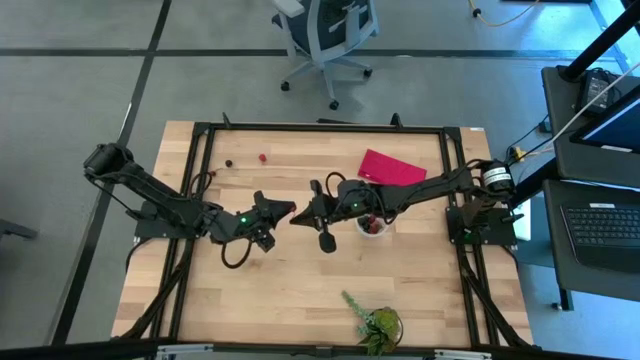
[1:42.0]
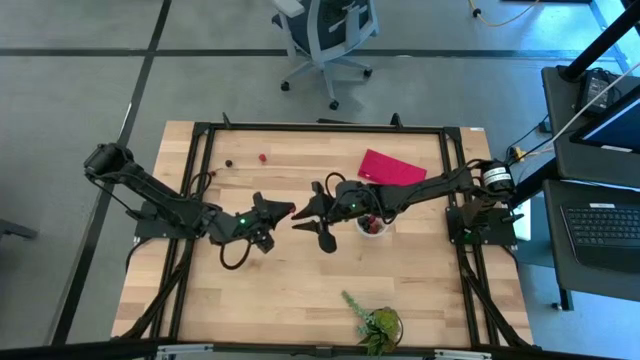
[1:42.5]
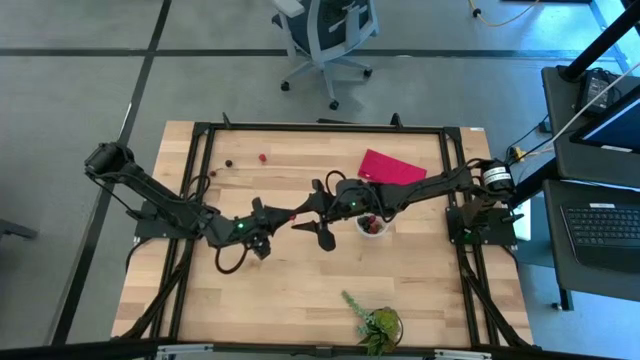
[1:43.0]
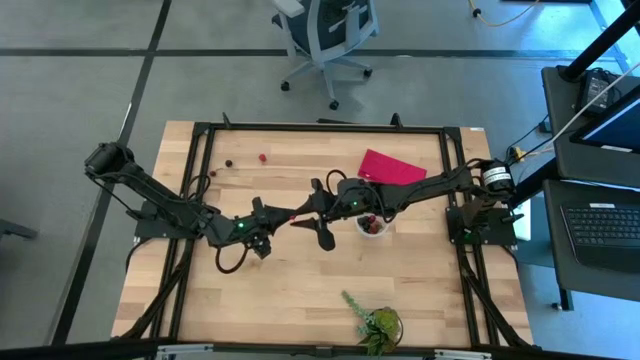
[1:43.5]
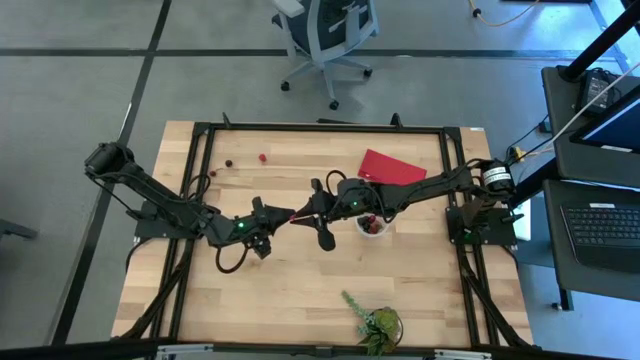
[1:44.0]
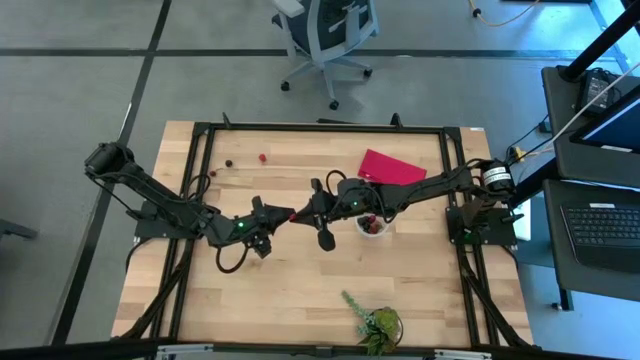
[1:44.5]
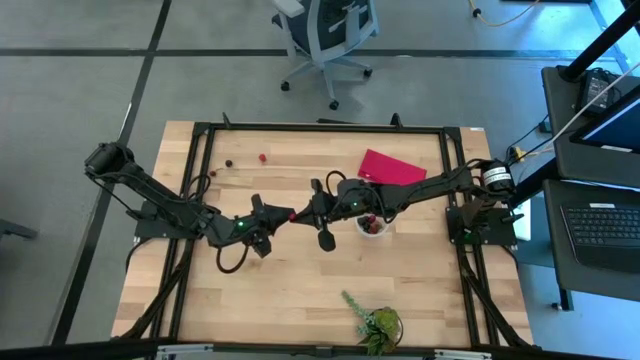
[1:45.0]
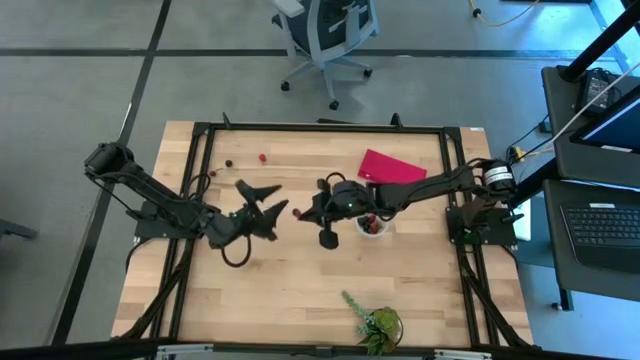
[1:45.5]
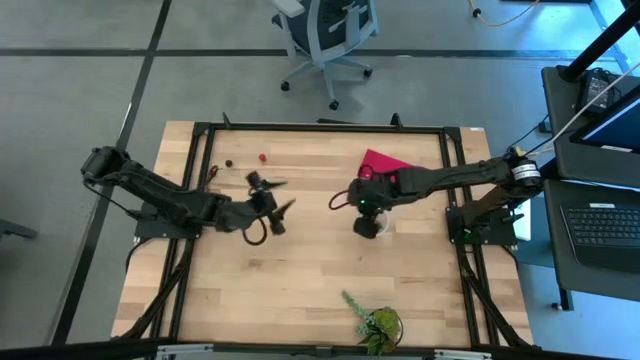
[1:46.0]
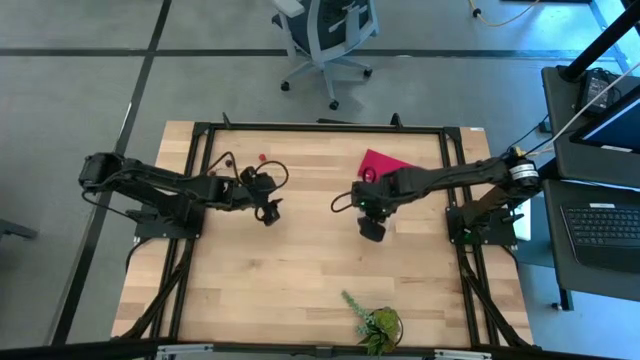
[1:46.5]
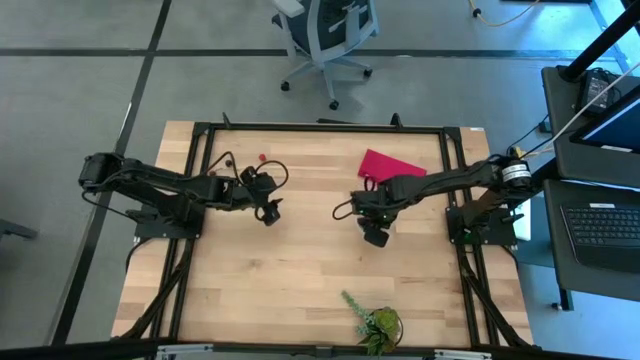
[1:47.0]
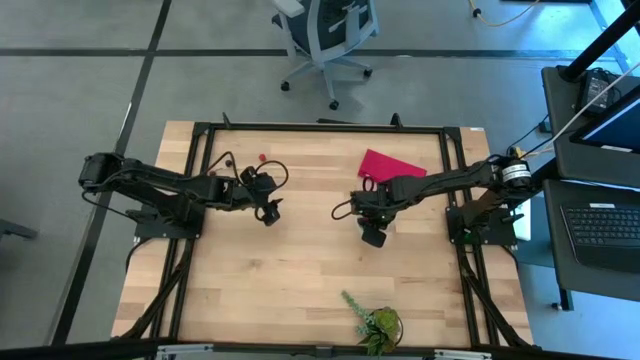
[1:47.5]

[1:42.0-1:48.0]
Task: Pick and placing Produce into tupperware
Put the bottom red cherry into the transparent container

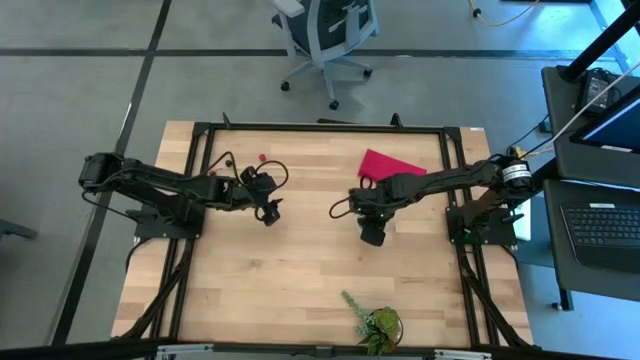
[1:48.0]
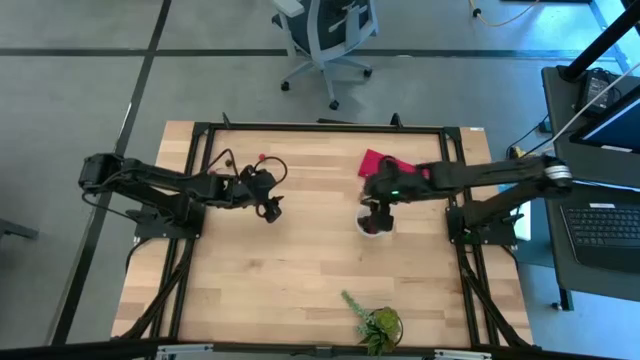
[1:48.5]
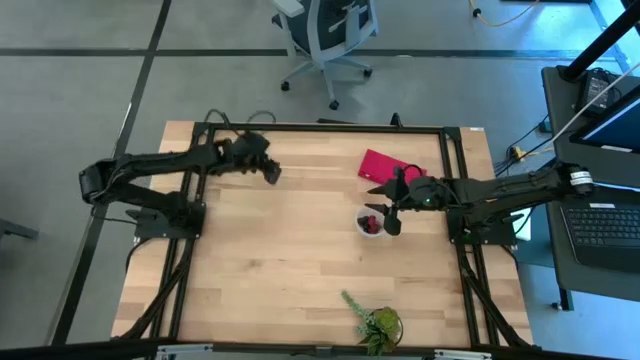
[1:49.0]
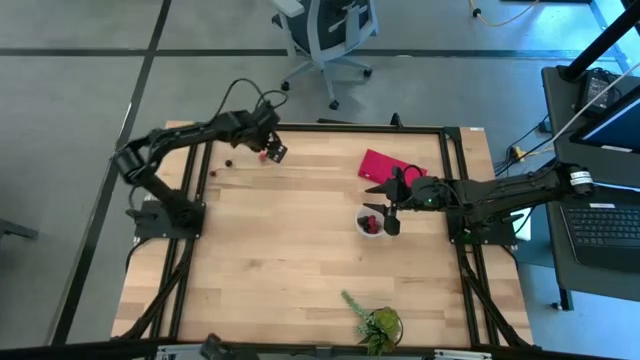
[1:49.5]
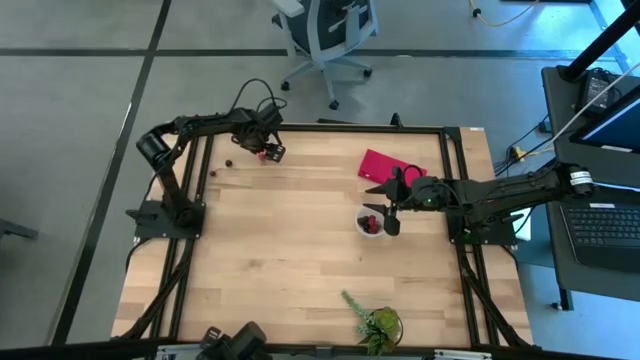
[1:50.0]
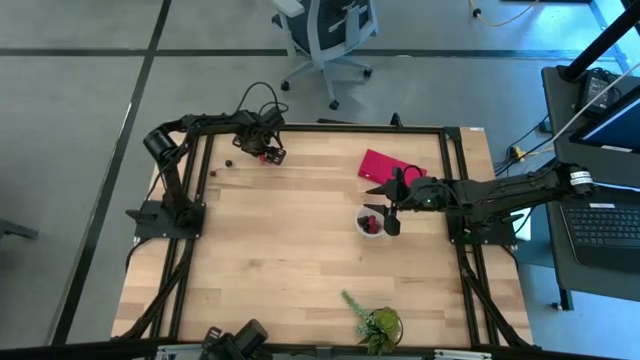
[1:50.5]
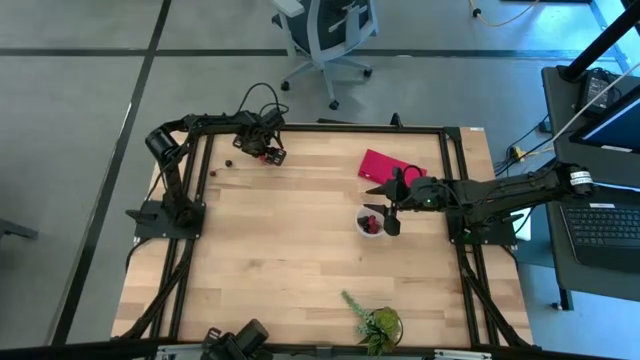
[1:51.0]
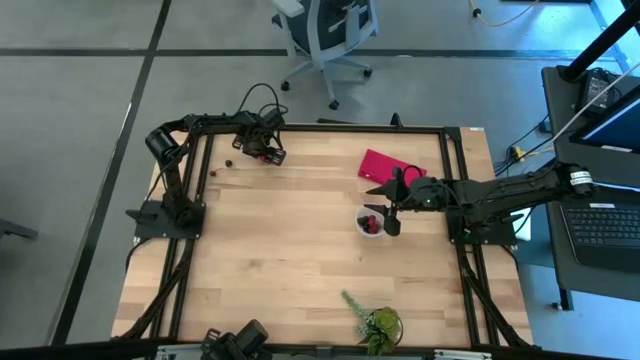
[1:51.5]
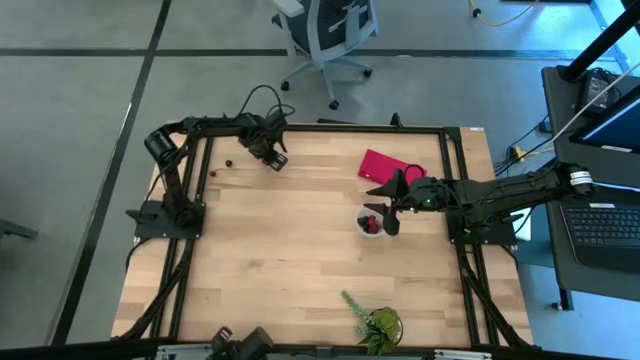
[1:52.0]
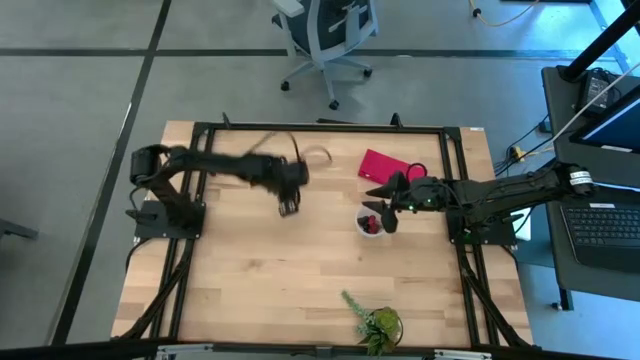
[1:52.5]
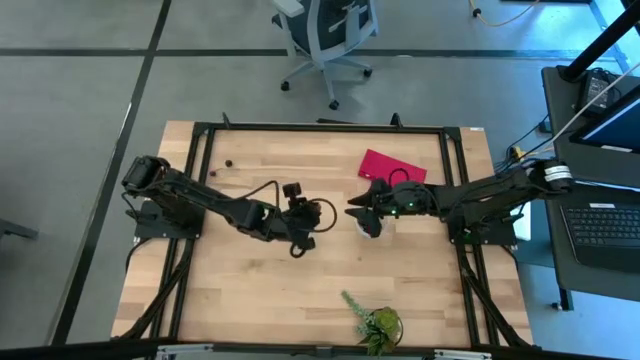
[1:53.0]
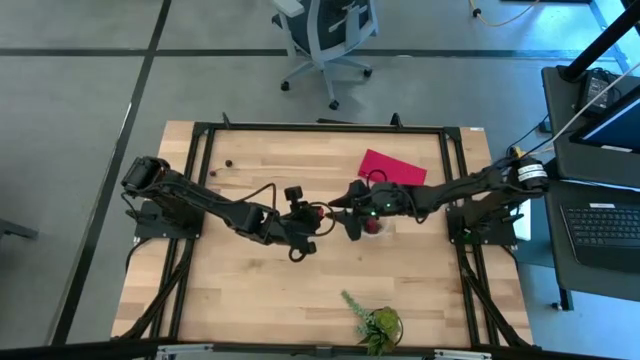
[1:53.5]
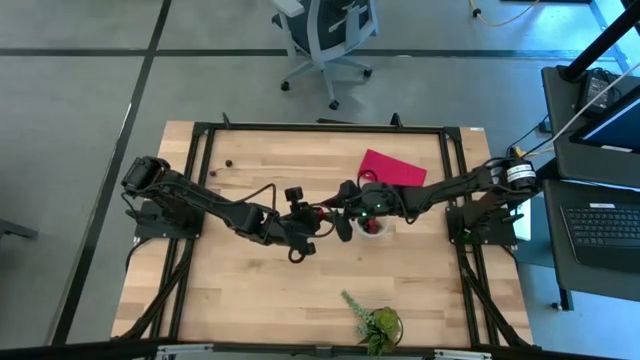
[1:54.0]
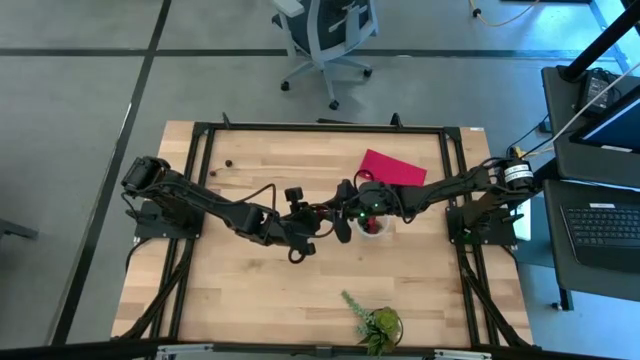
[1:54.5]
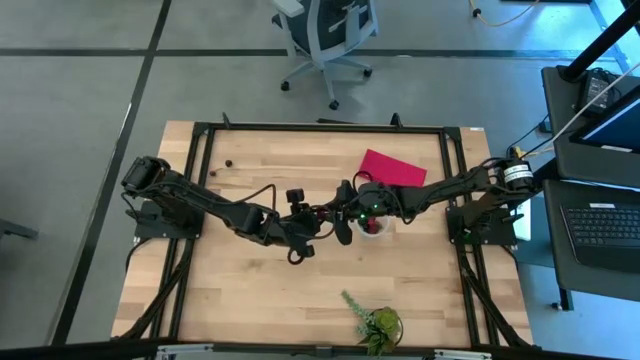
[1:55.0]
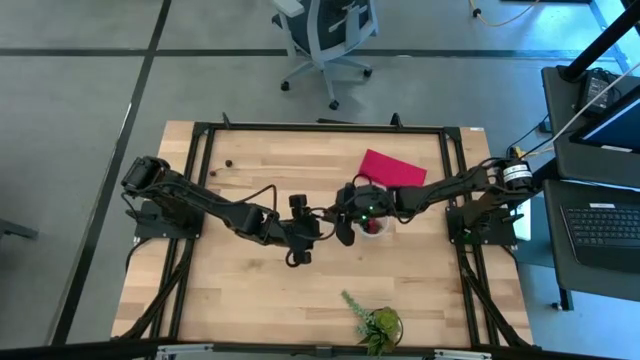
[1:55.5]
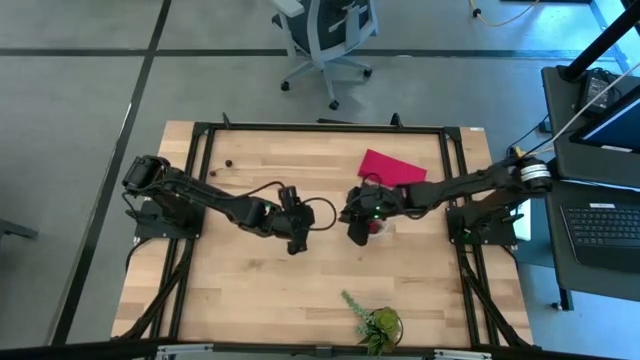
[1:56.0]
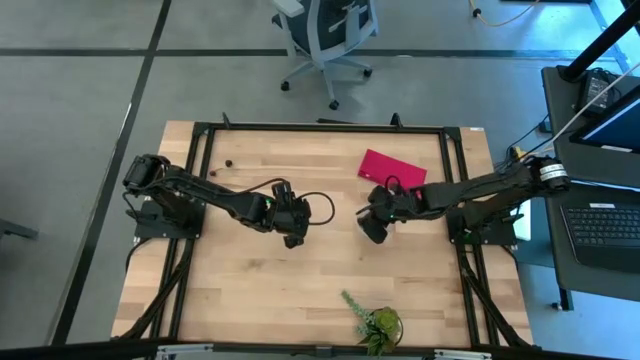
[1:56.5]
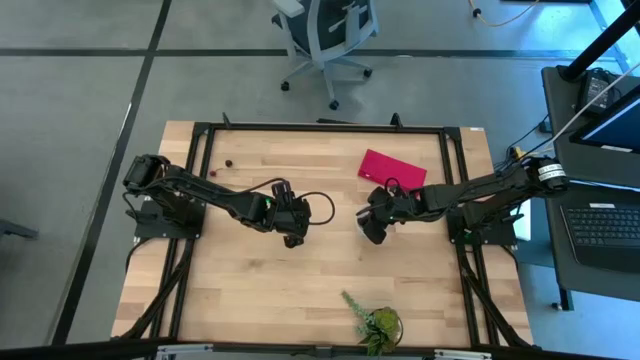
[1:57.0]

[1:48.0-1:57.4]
Put the red raspberry into the transparent container

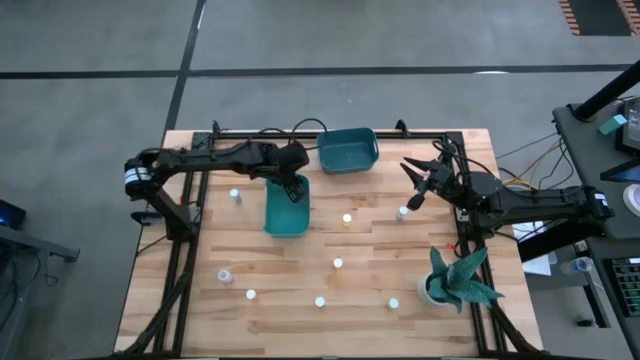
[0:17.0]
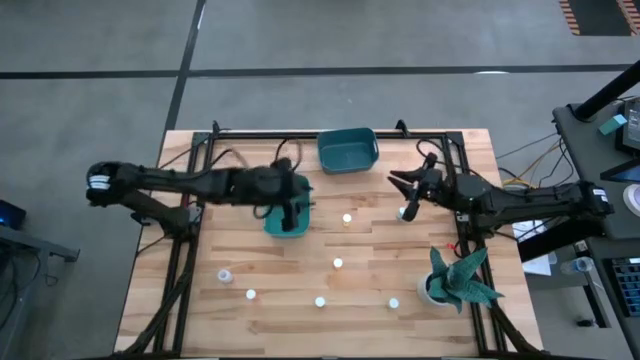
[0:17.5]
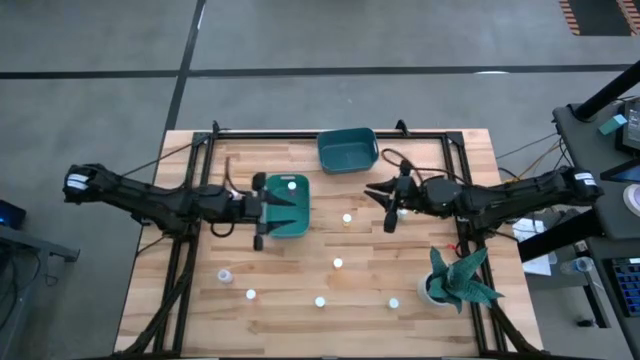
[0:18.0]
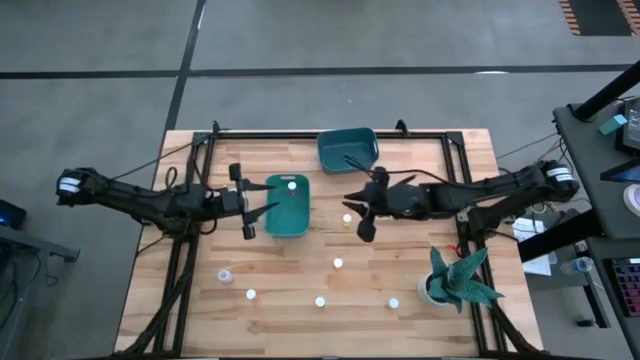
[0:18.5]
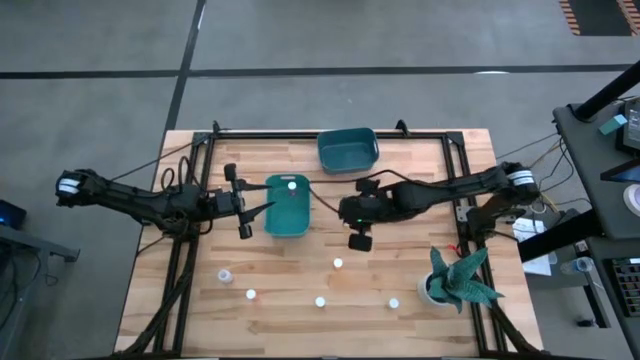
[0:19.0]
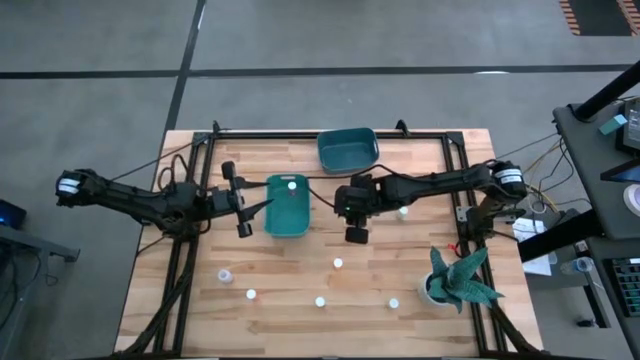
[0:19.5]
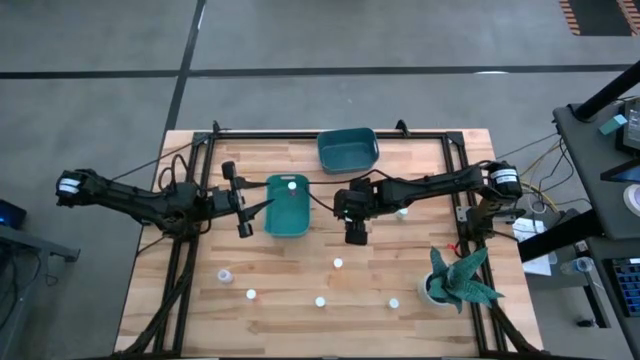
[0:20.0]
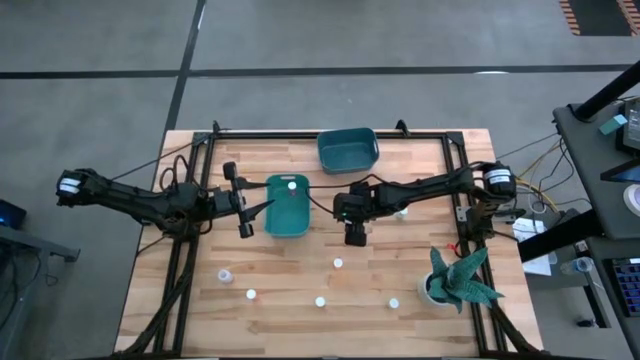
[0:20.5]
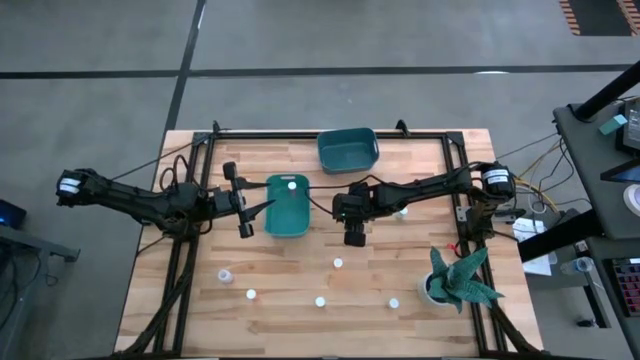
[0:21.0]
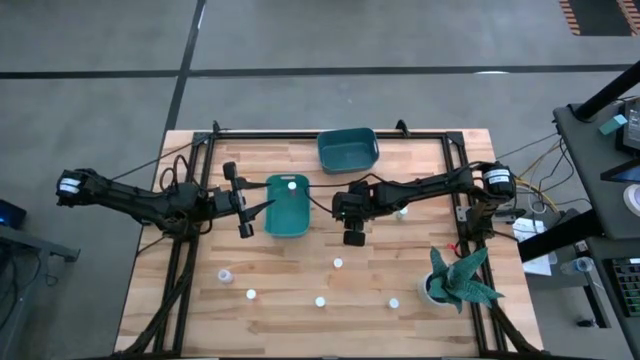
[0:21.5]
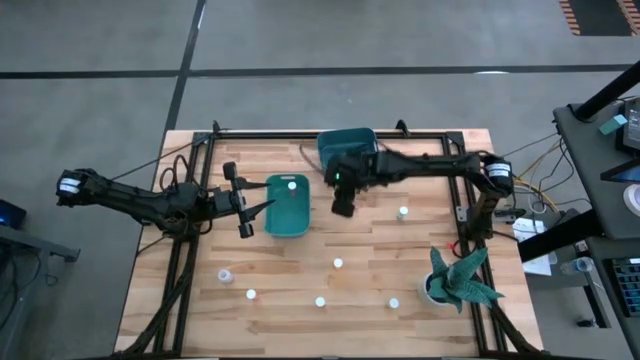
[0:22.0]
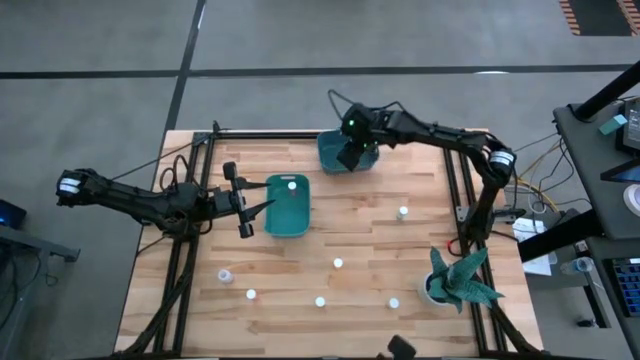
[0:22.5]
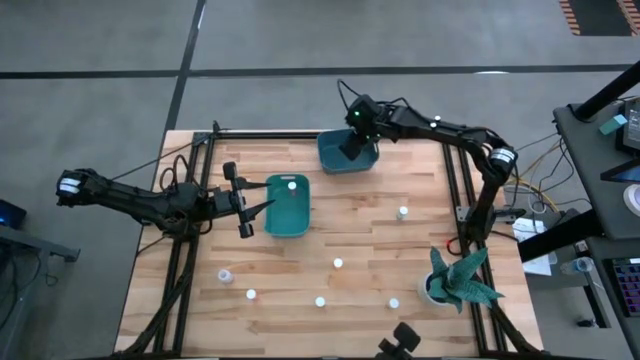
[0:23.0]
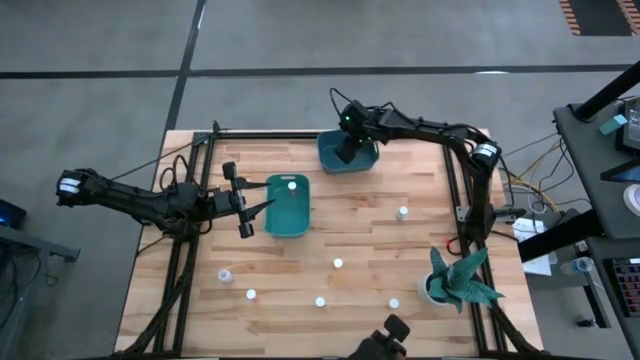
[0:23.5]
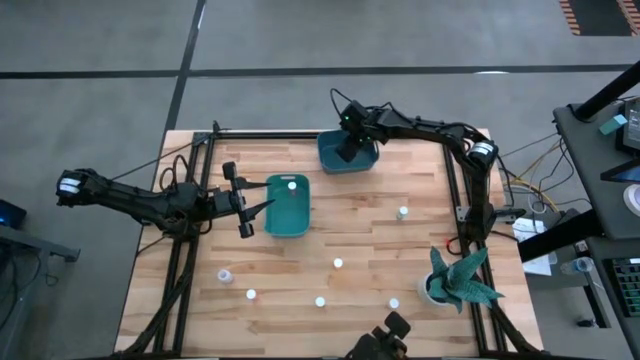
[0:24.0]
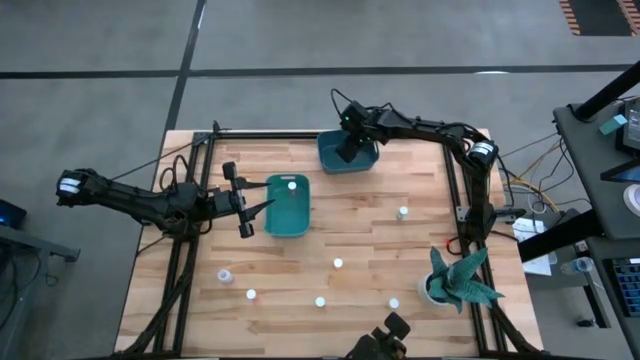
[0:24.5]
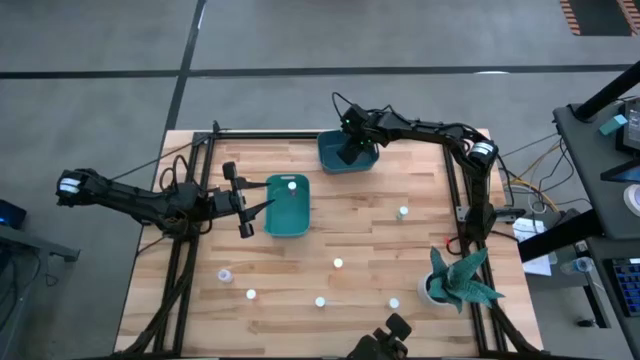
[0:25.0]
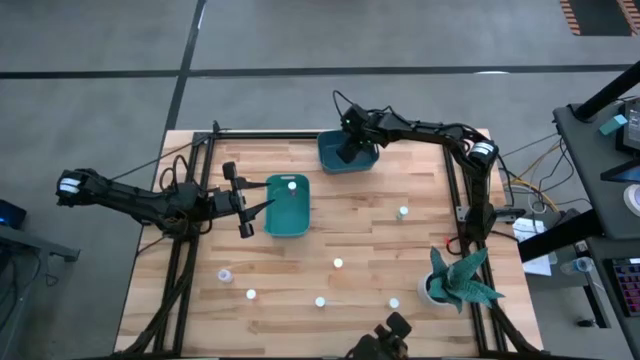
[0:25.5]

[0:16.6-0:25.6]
Task: Pick and place medicine bottles into bin by pill shape (circle, oval)
Put the top yellow tablet pill bottle into the blue bin
